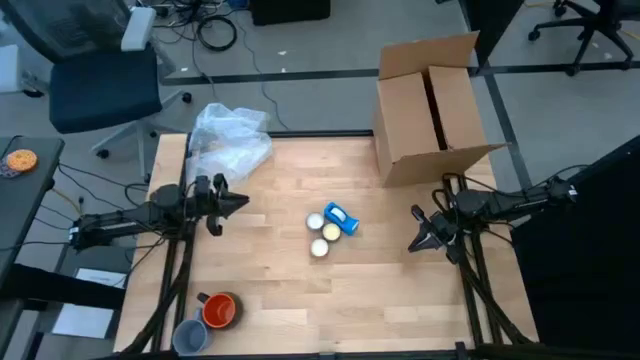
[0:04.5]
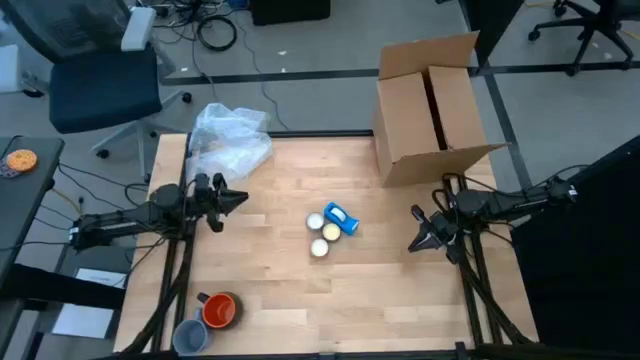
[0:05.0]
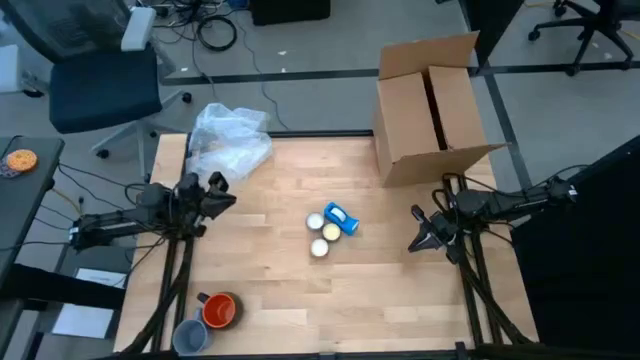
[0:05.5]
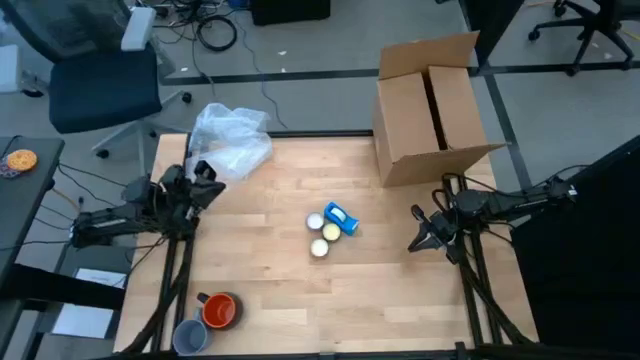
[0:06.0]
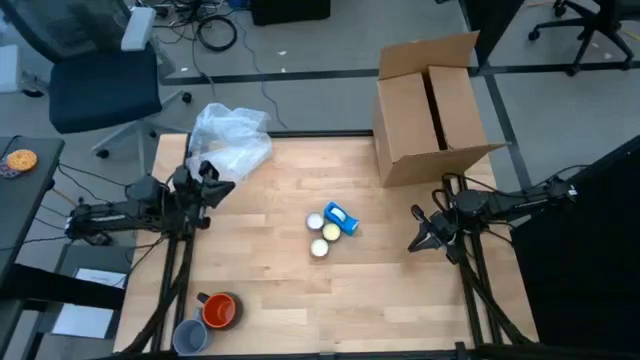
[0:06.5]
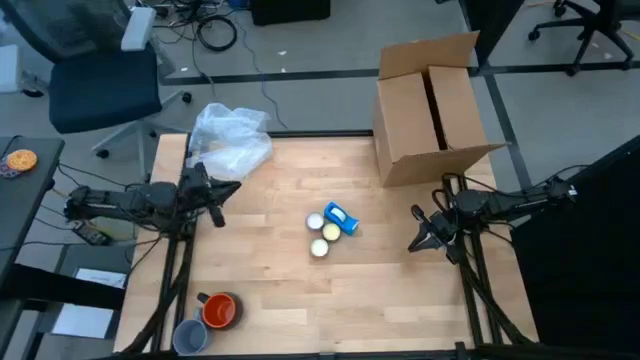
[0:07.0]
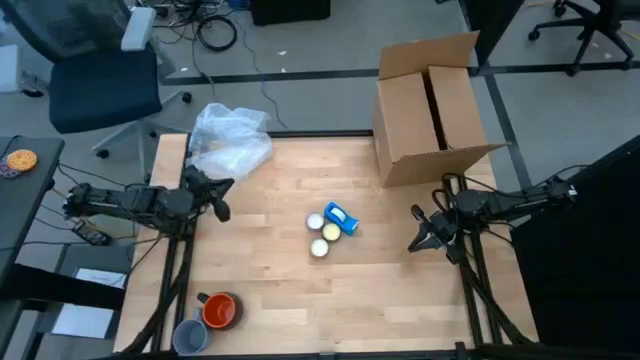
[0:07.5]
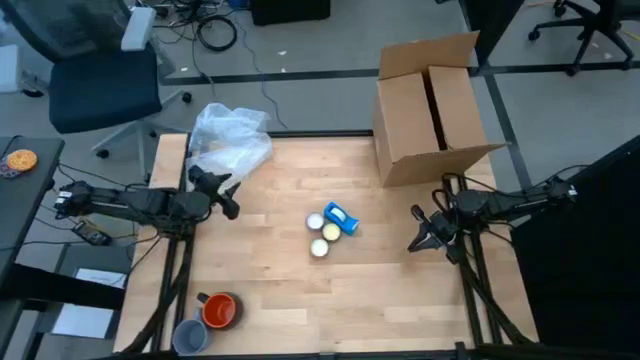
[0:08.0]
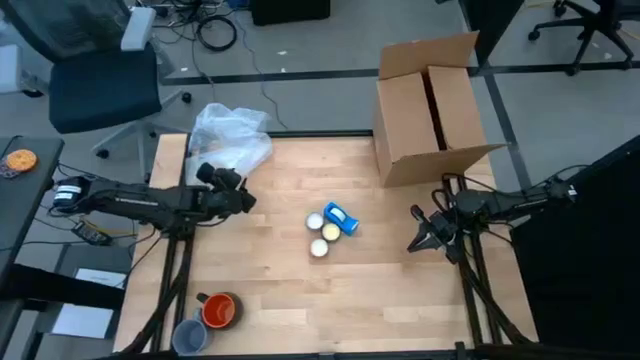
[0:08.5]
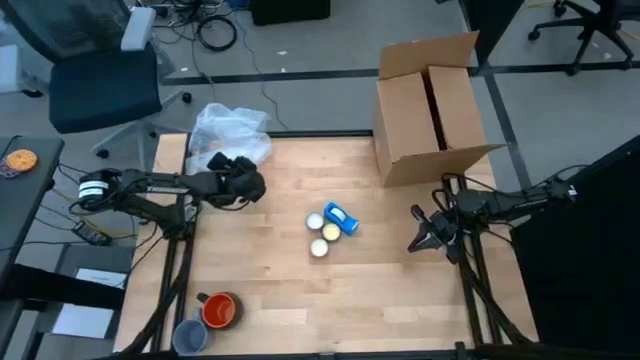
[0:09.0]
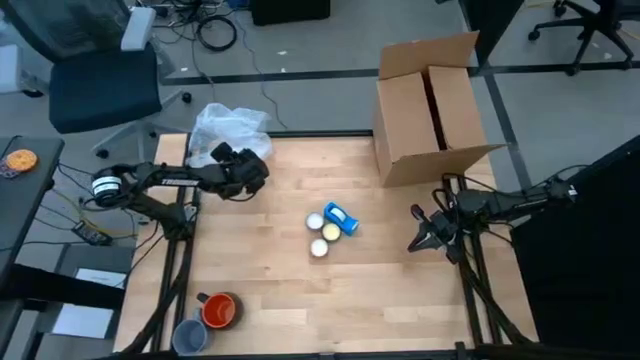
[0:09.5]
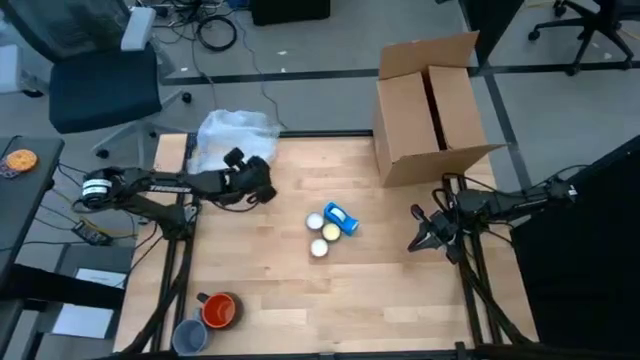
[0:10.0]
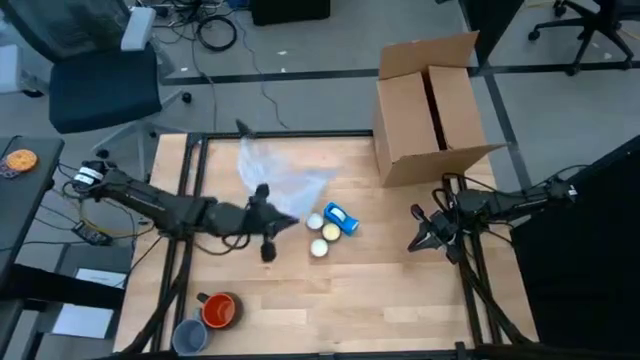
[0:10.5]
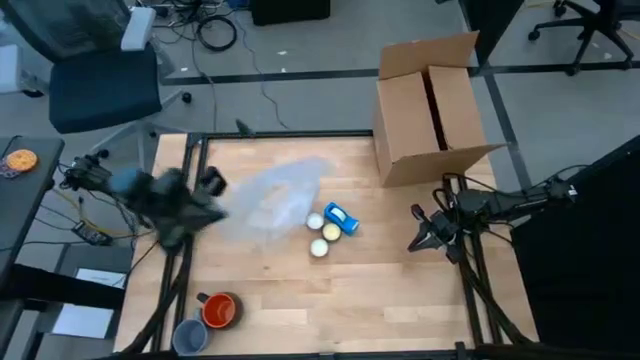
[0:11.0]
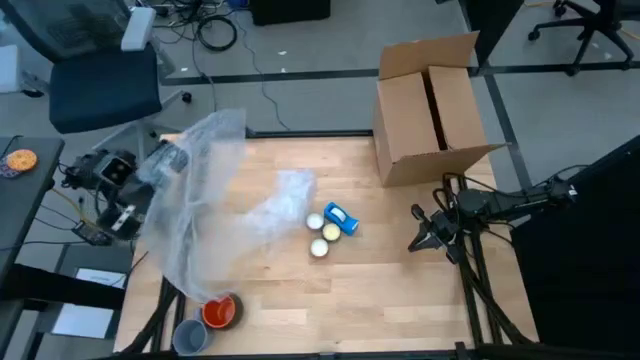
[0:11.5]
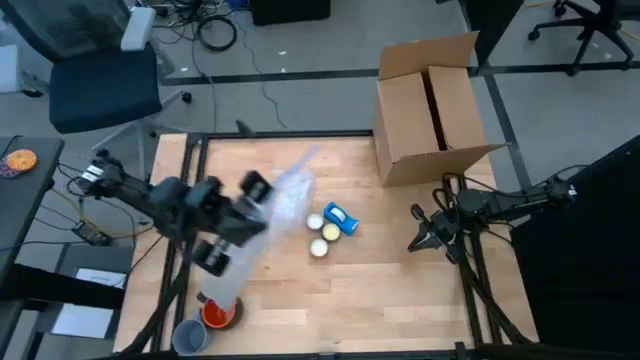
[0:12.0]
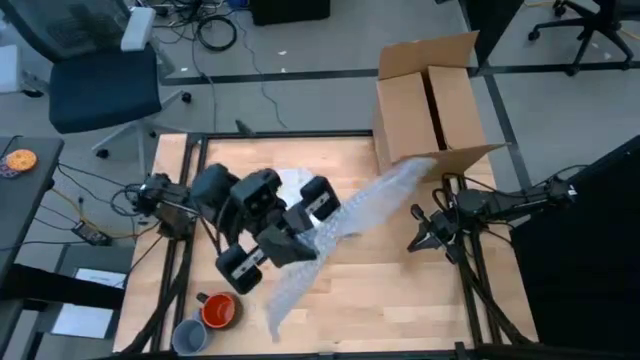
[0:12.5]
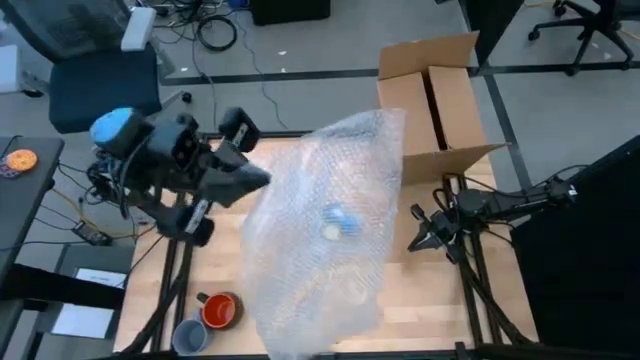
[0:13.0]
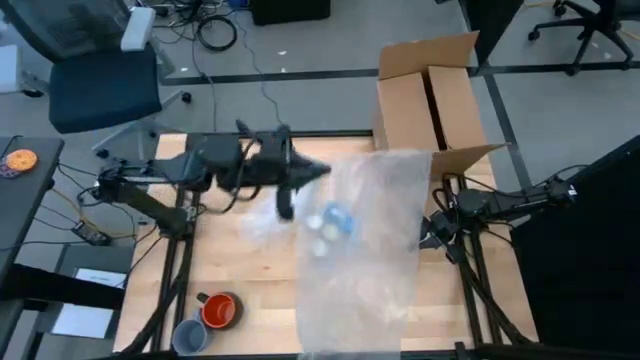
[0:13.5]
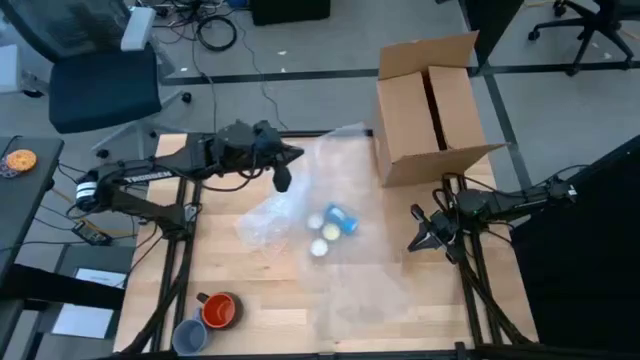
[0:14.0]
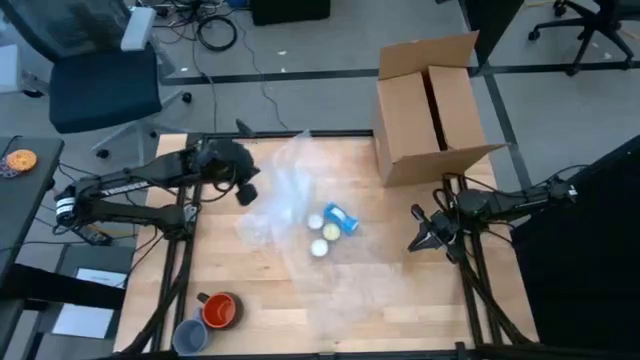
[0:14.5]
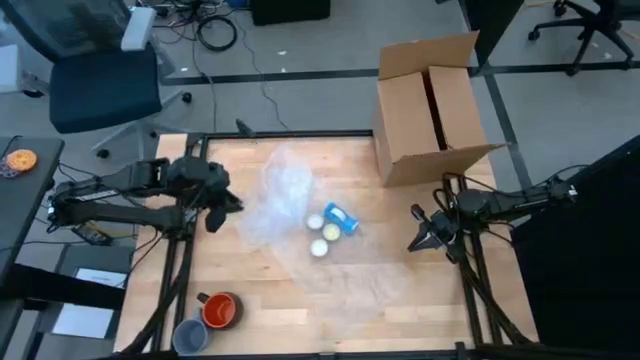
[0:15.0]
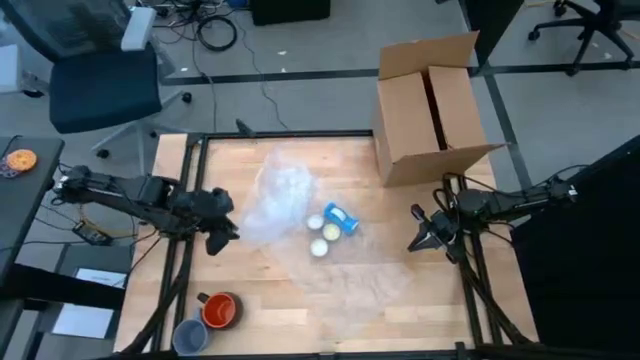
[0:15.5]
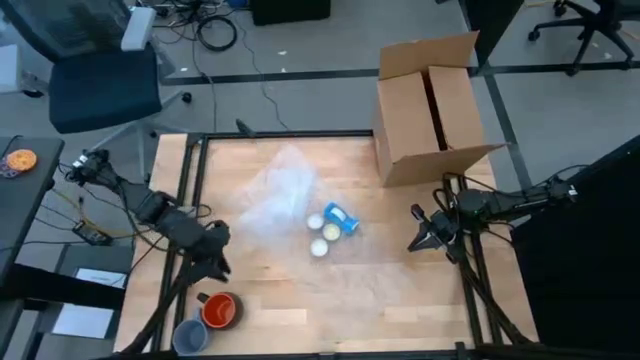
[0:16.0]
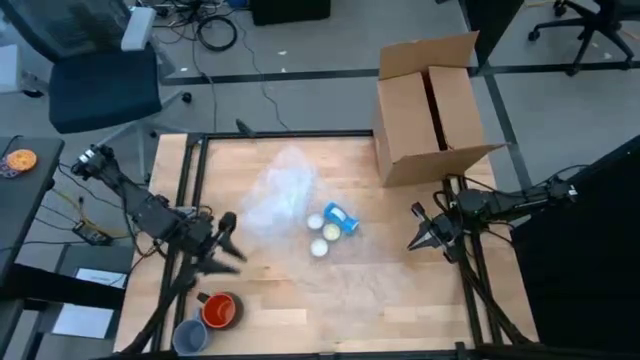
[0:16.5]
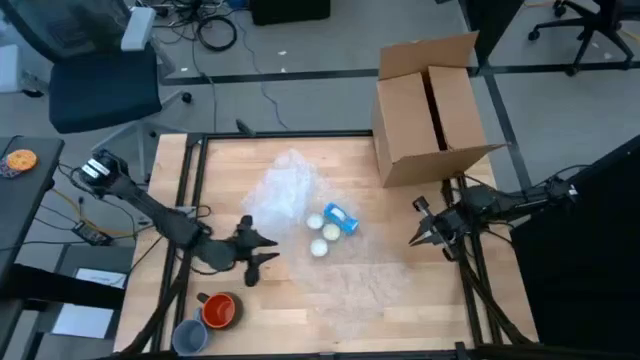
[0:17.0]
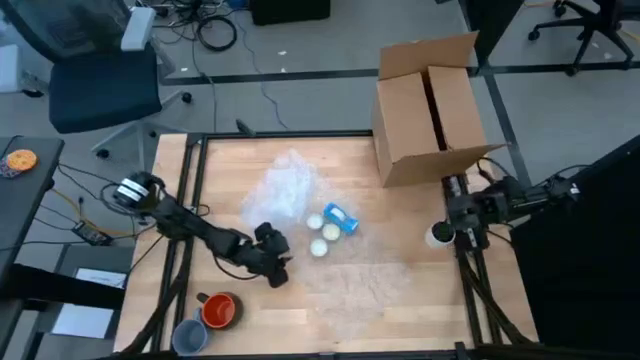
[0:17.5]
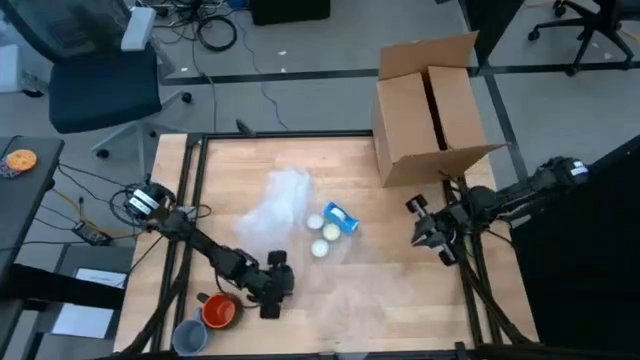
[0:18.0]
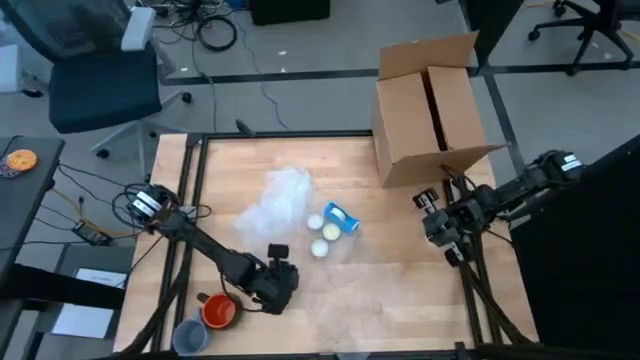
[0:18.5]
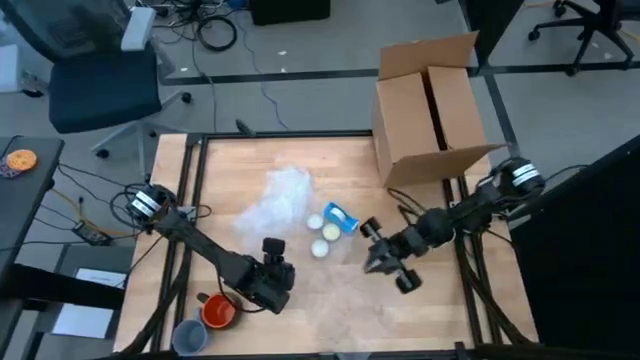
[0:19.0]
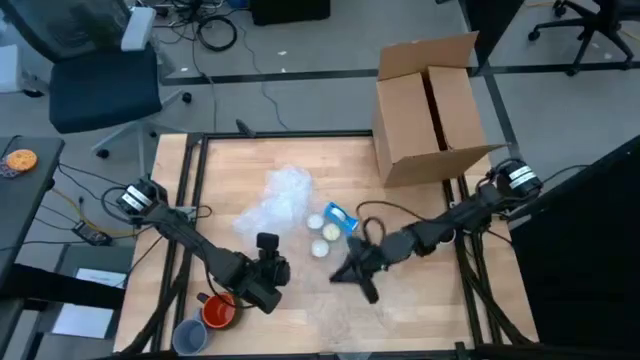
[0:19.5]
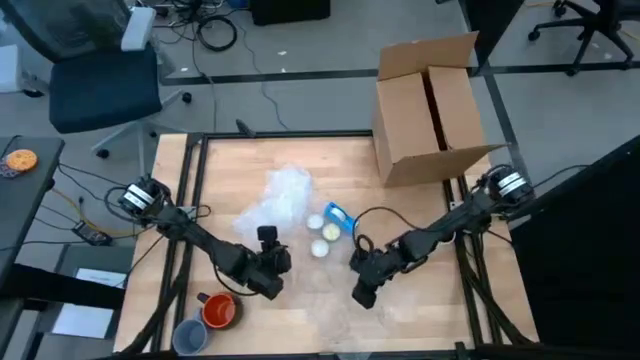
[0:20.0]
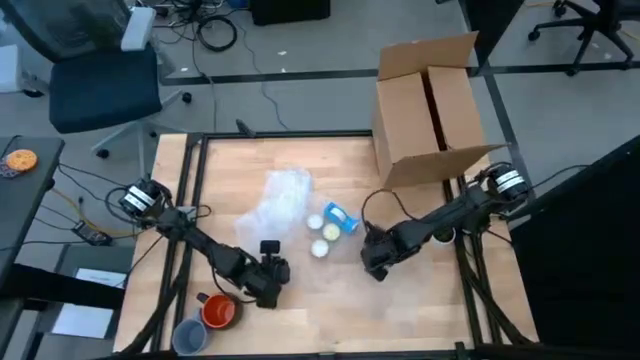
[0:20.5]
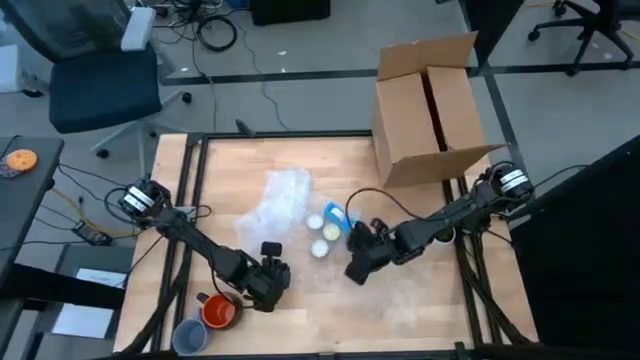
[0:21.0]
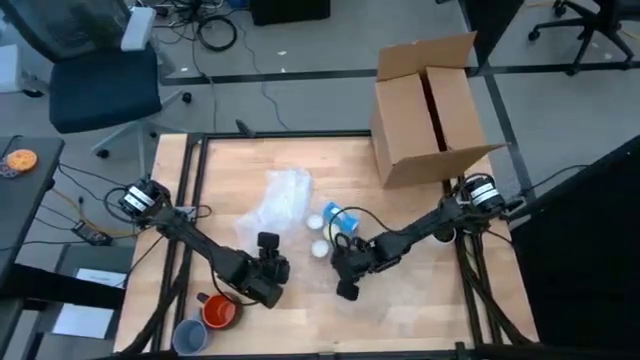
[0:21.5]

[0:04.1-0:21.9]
Task: wrap mug
Prepare the transparent bubble wrap

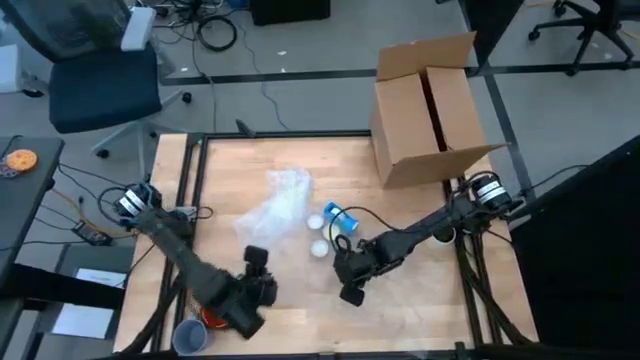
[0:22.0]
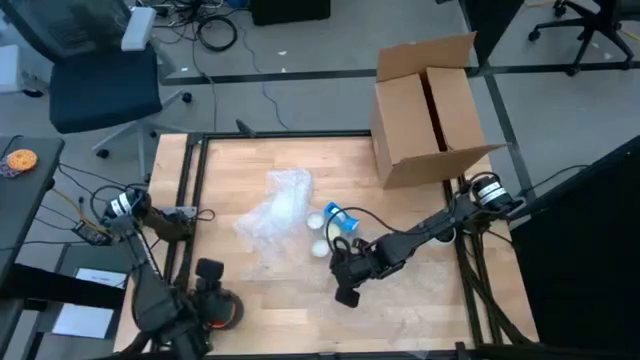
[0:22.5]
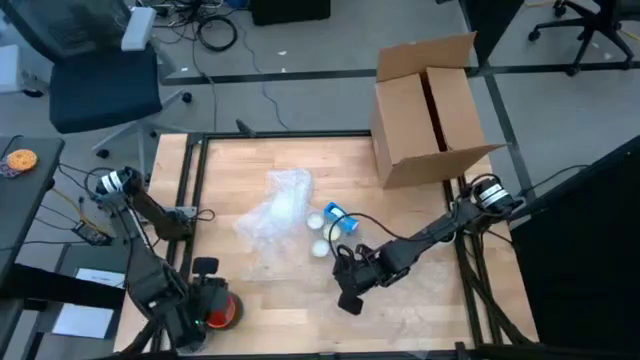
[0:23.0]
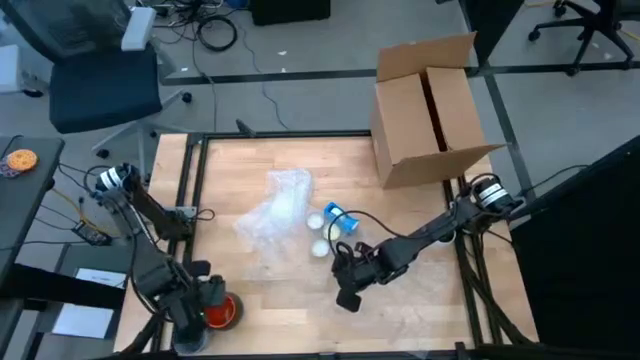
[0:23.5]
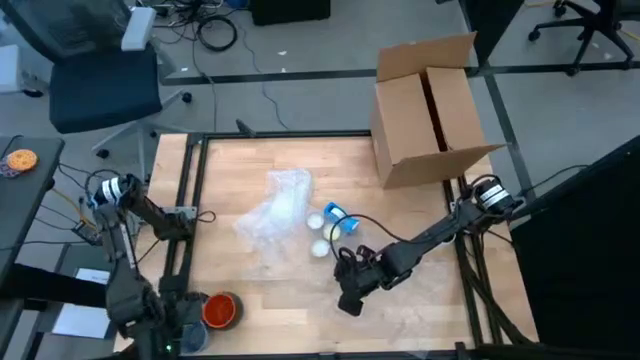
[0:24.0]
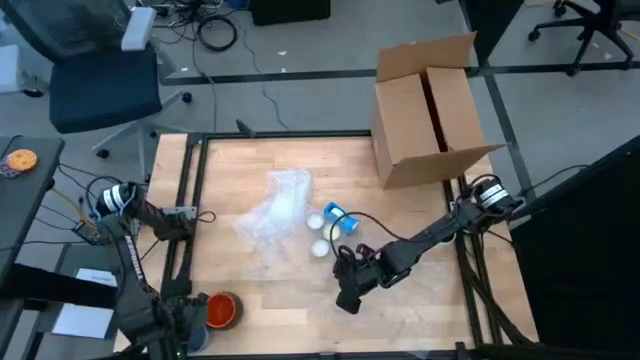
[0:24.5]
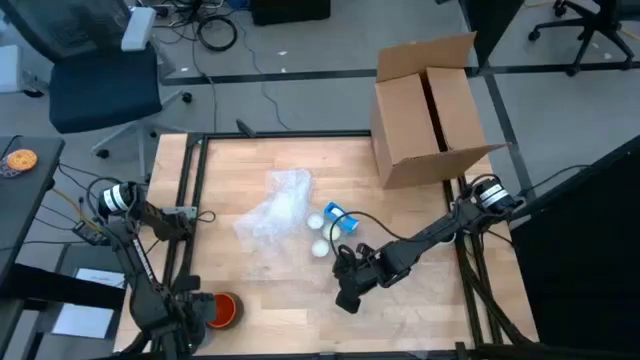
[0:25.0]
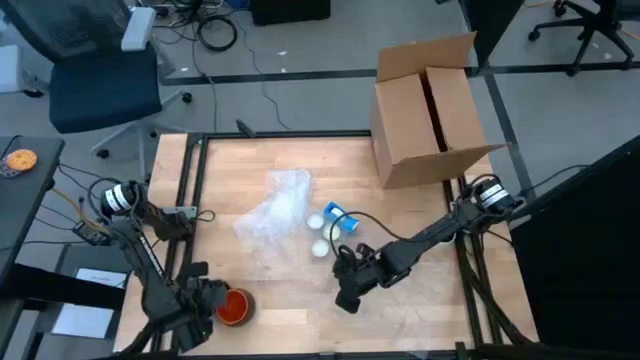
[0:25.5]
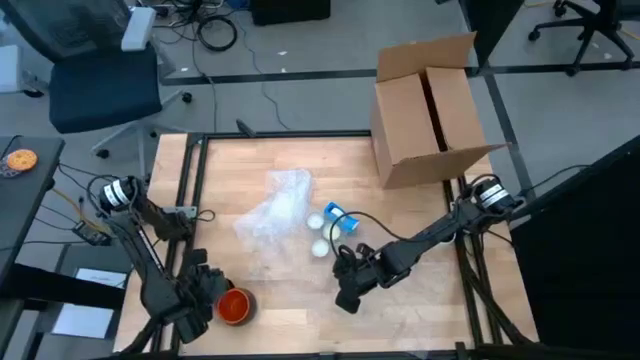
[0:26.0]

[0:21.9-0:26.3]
Move the purple mug to the middle left of the table

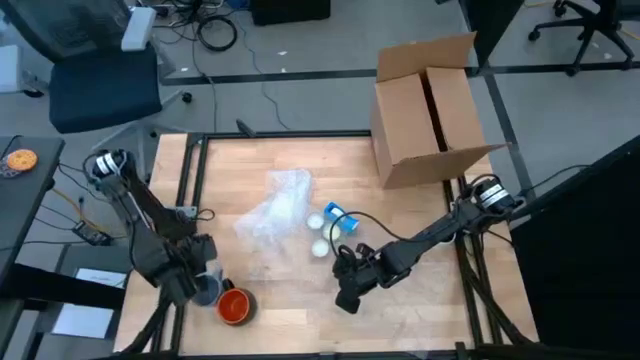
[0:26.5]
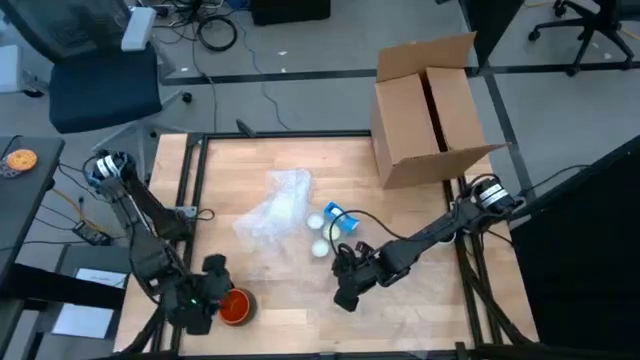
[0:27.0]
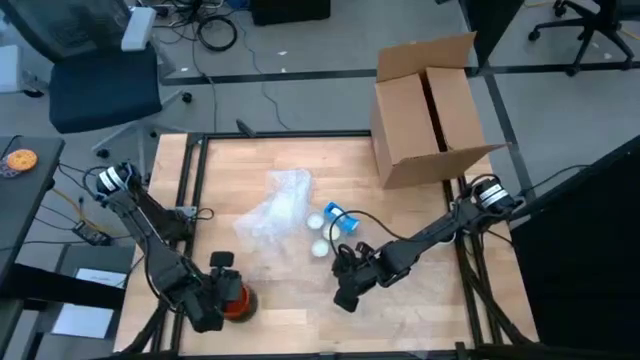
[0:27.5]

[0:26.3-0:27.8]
Wrap the black mug with the transparent bubble wrap
